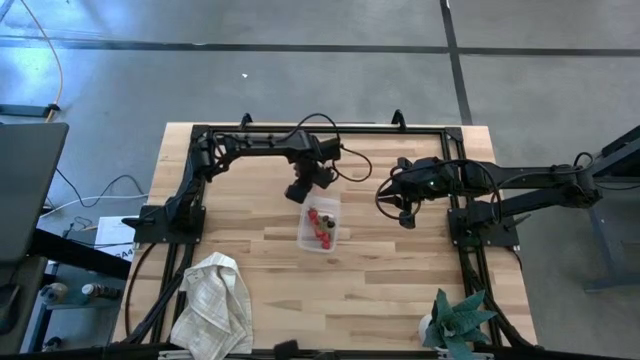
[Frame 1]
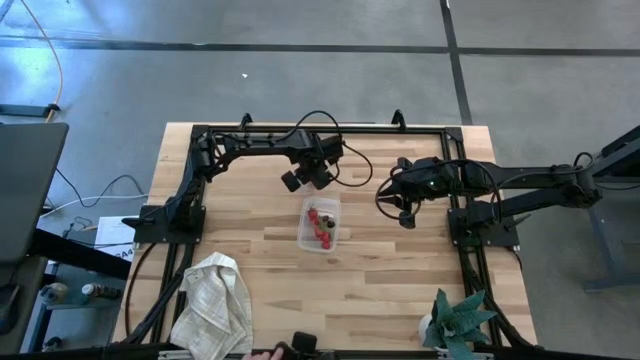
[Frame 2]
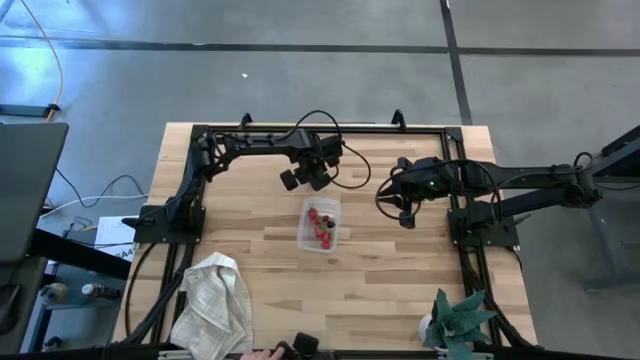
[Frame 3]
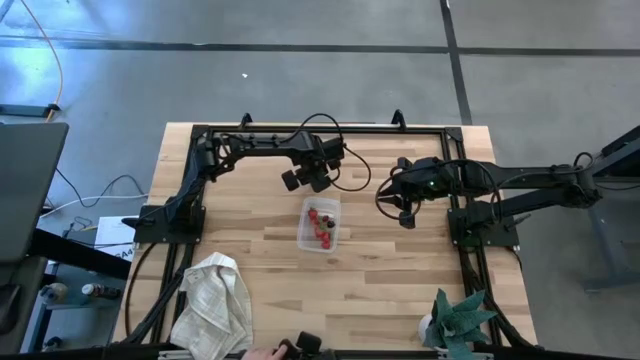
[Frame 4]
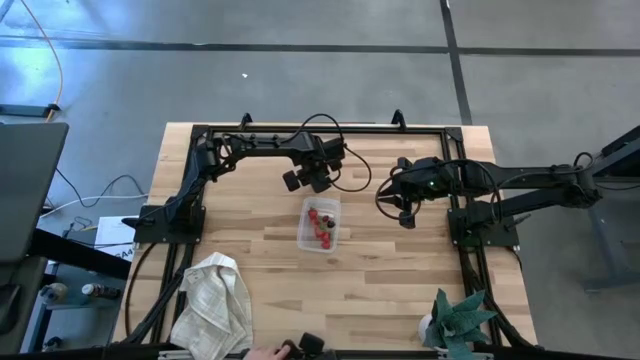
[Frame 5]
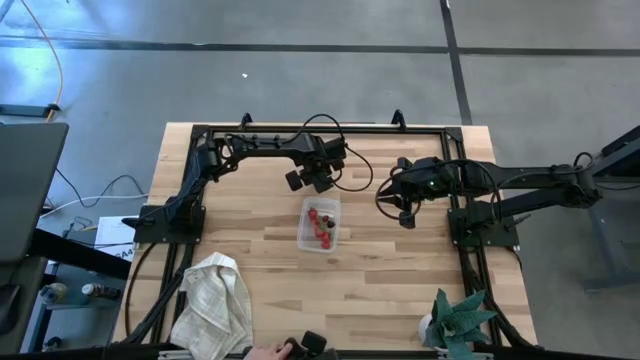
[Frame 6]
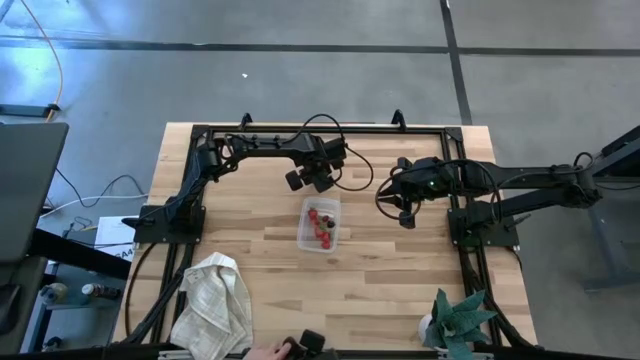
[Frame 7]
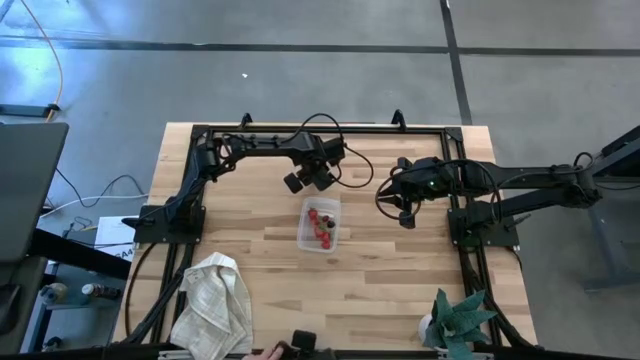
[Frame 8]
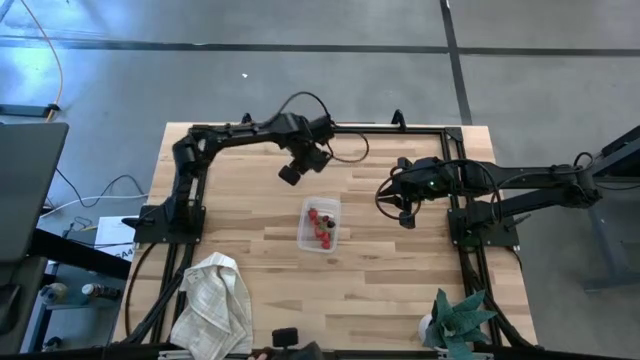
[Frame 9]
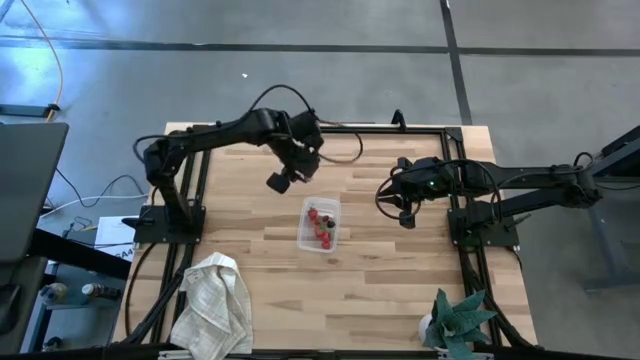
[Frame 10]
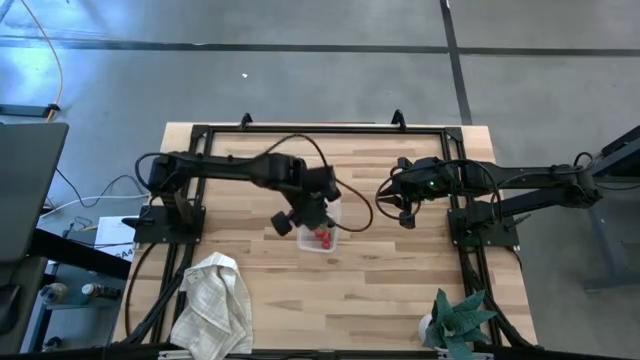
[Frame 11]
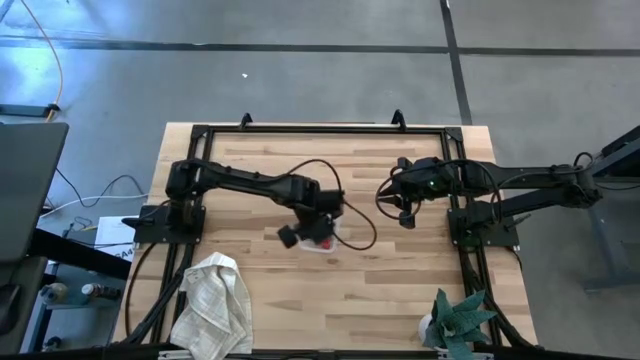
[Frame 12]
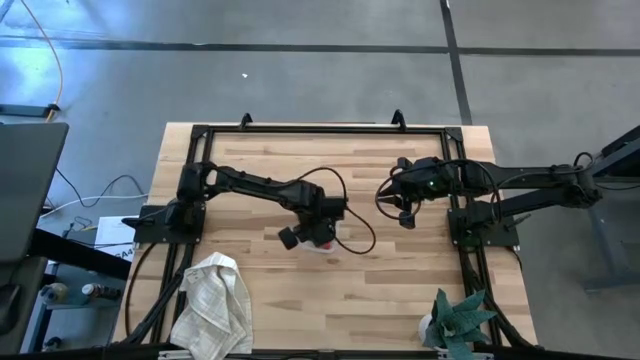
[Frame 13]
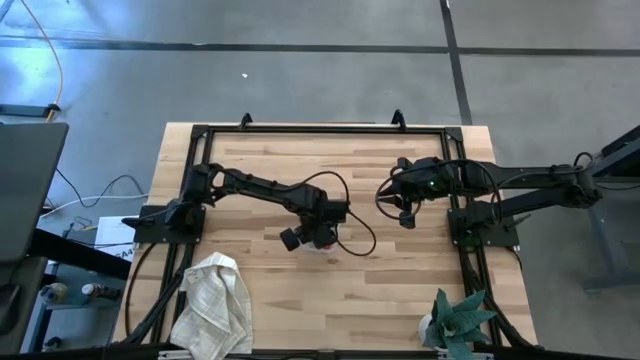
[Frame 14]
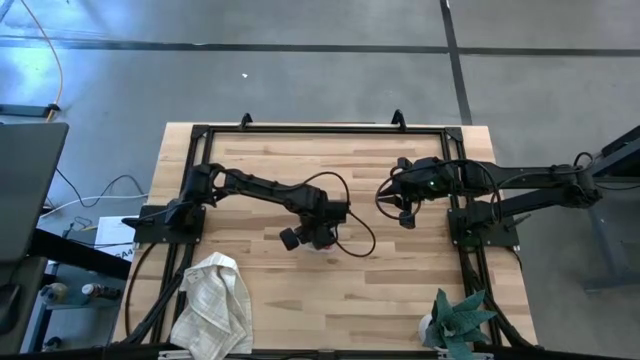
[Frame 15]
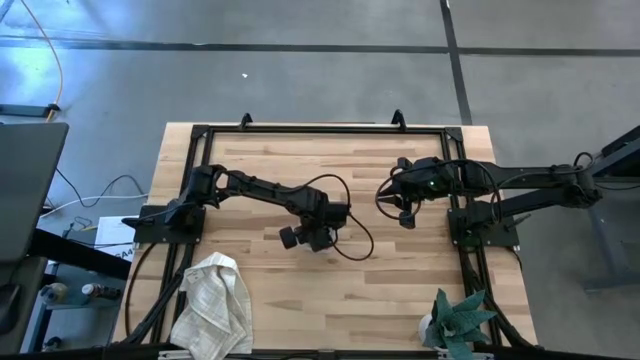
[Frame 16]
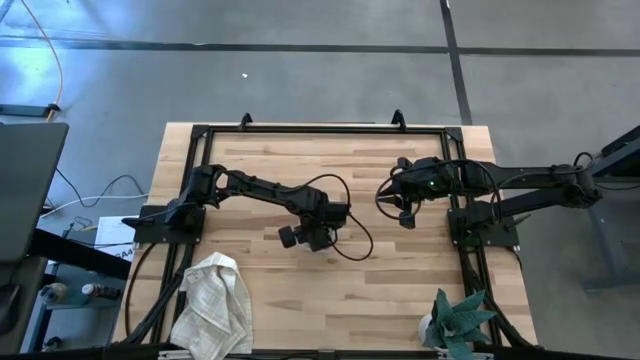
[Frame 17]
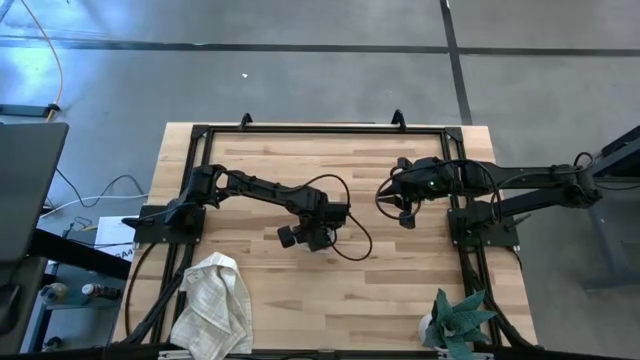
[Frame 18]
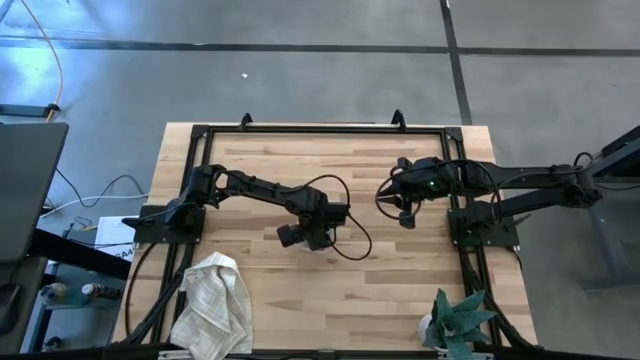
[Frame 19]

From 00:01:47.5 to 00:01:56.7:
Task: Pick and placing Produce into tupperware
Put the peach into the transparent bin

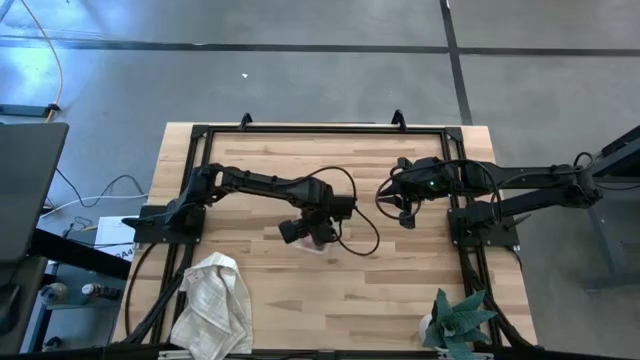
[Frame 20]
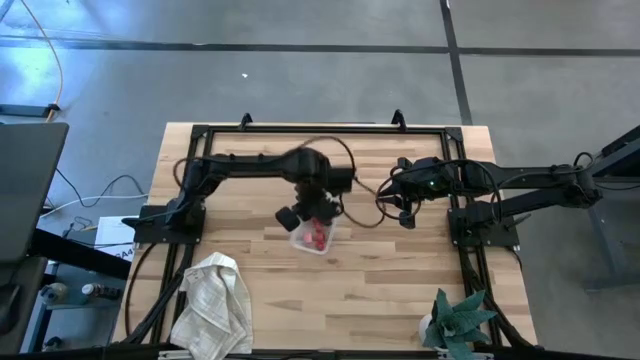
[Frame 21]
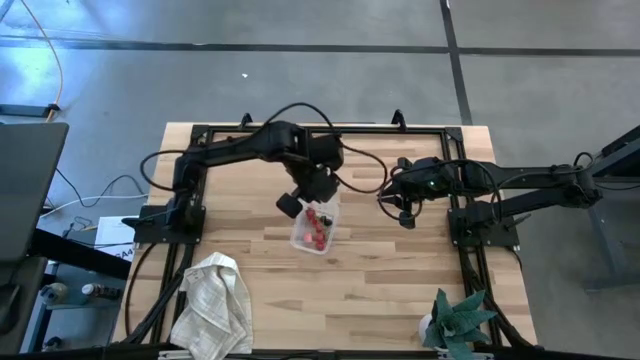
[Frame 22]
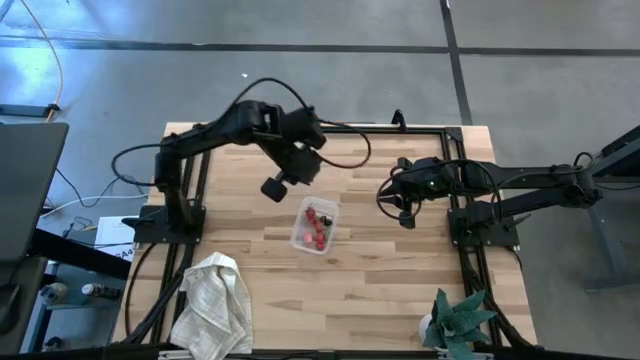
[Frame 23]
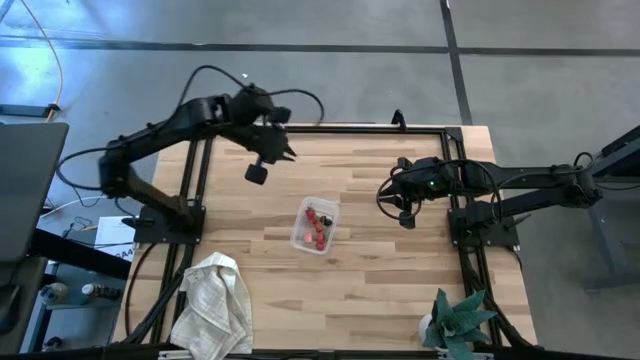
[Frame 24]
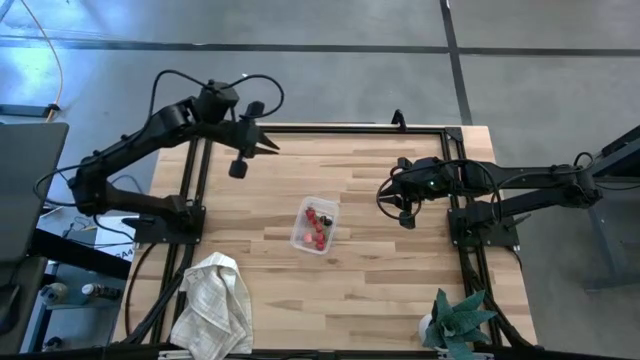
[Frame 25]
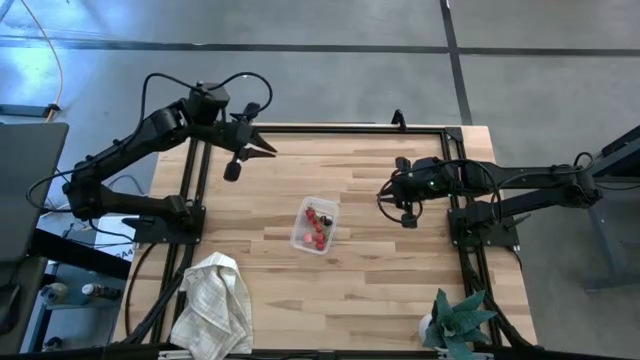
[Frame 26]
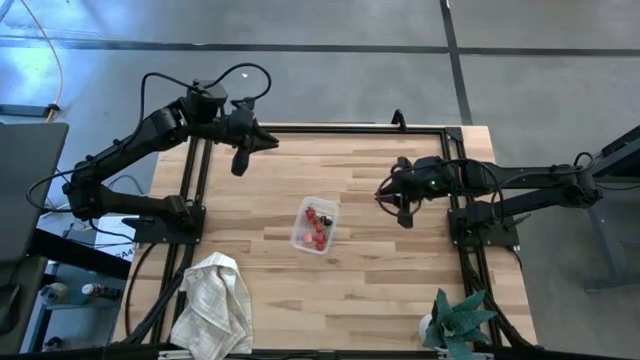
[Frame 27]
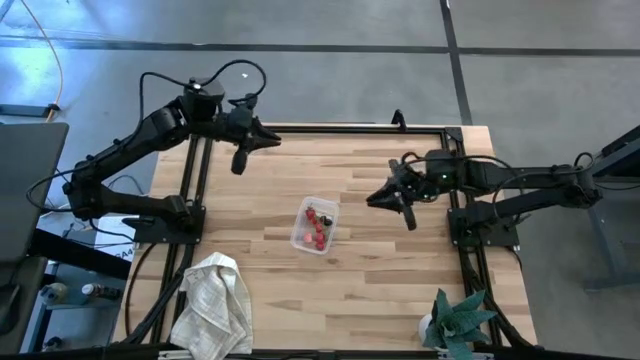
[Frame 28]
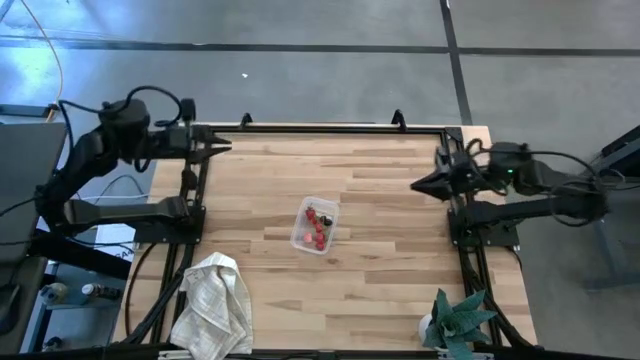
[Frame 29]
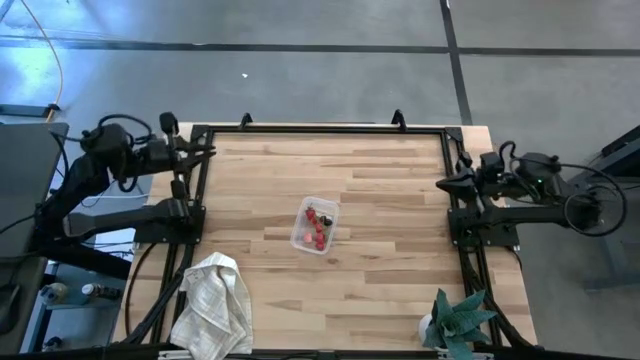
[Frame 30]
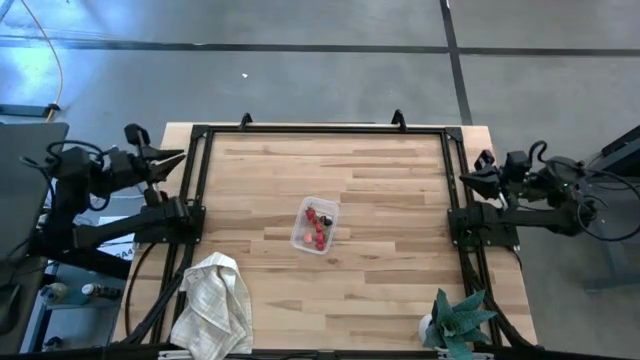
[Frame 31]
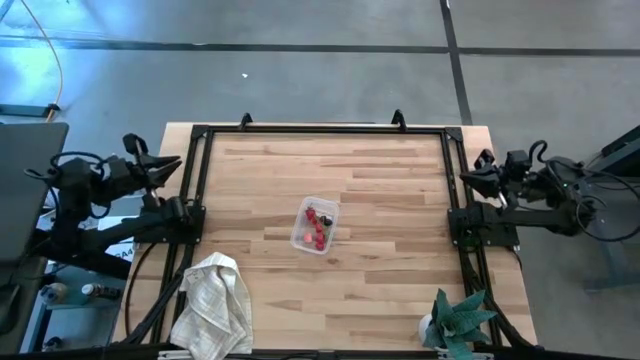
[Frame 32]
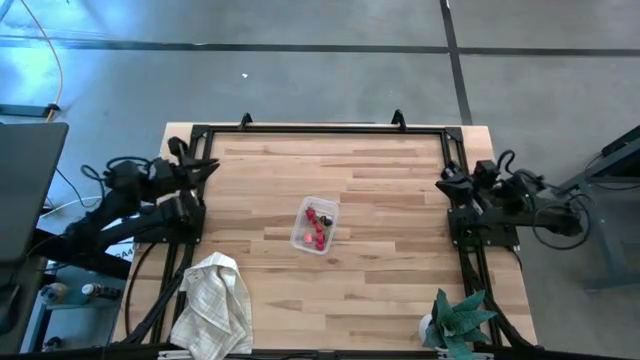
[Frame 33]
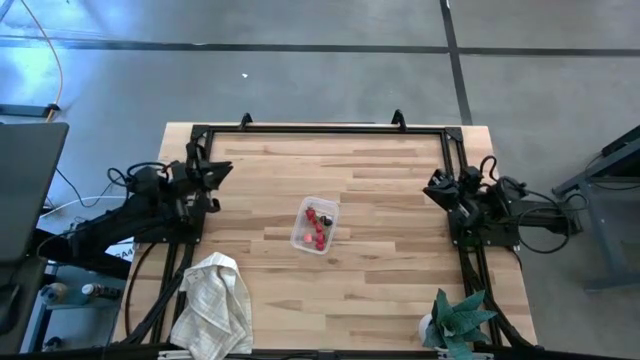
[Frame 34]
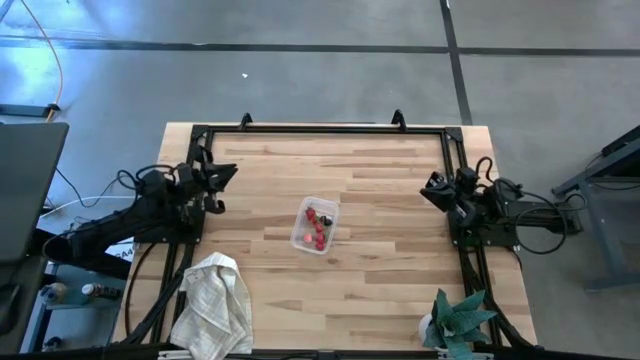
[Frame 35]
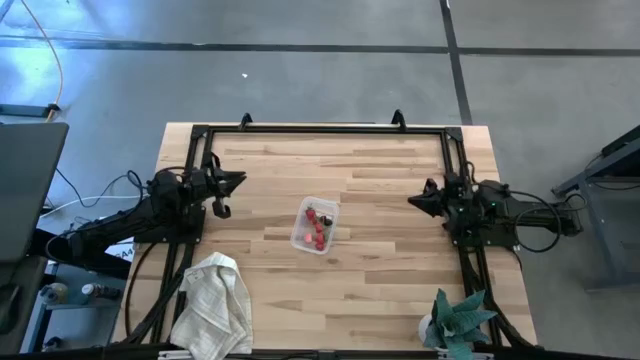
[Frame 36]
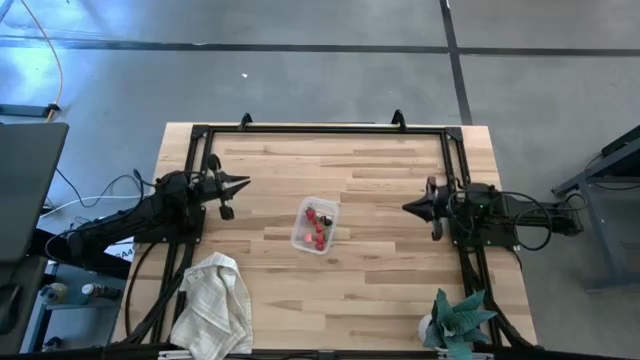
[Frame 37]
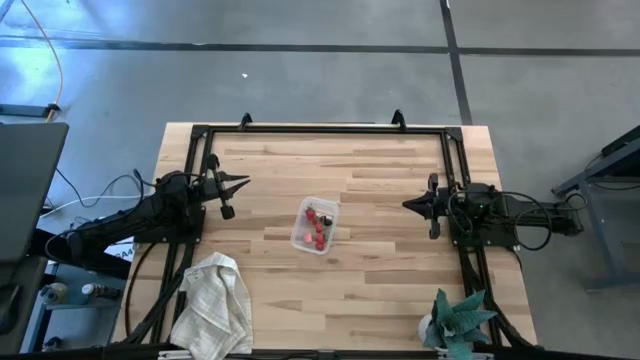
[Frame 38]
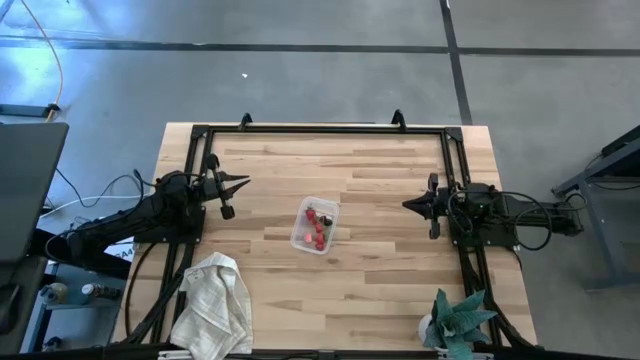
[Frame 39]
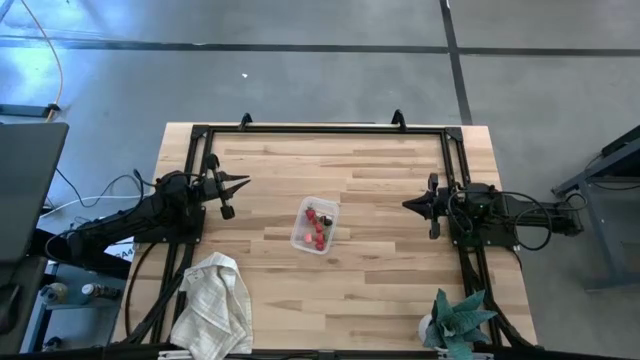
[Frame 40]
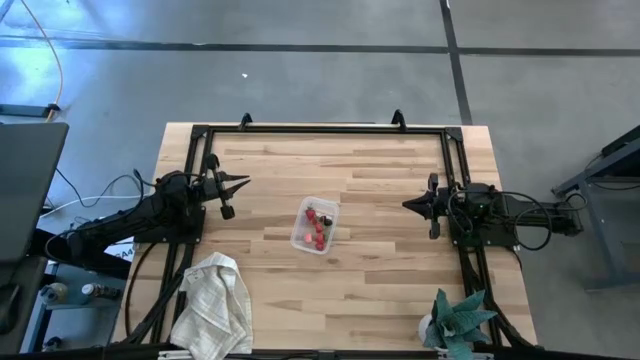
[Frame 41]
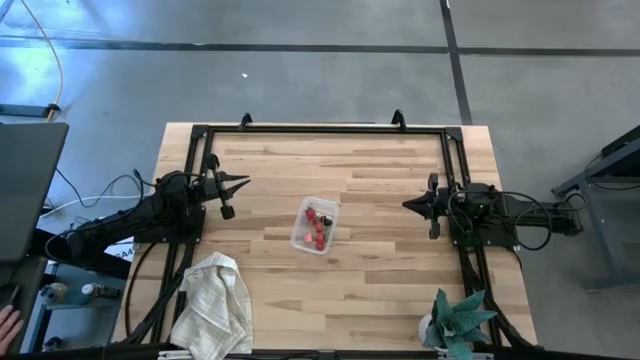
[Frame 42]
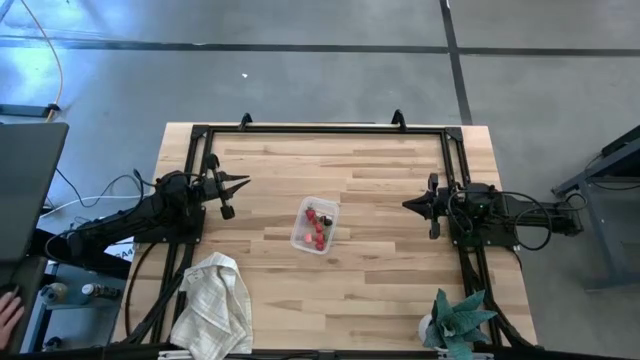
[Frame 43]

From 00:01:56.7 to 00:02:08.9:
Return to Home Position
